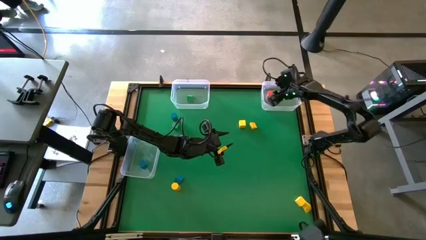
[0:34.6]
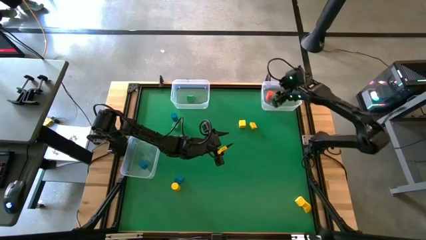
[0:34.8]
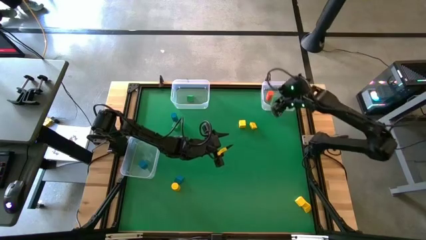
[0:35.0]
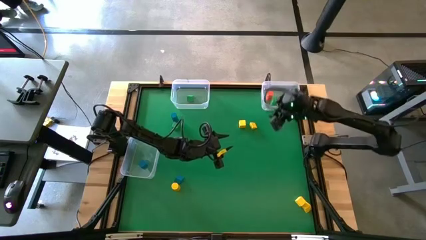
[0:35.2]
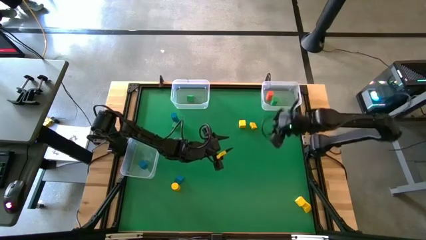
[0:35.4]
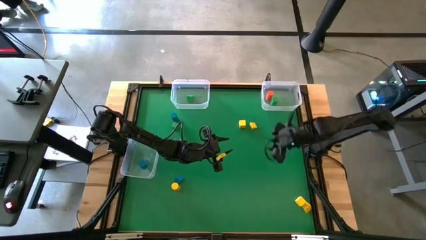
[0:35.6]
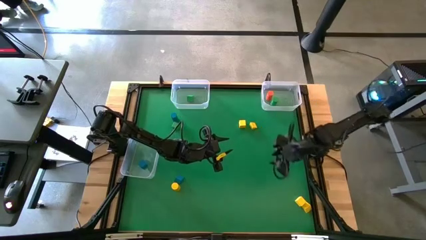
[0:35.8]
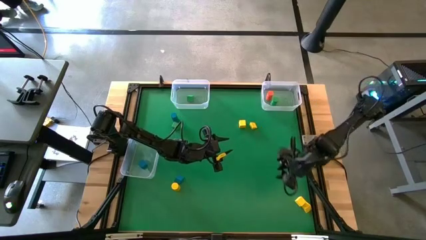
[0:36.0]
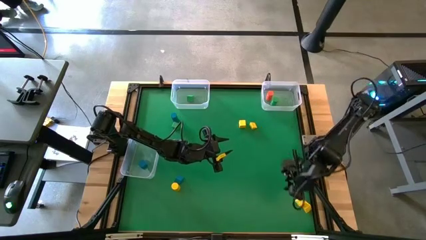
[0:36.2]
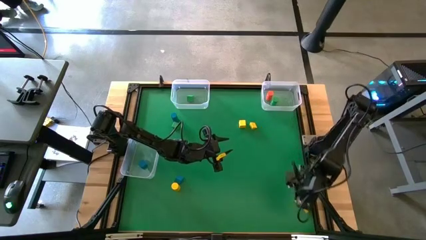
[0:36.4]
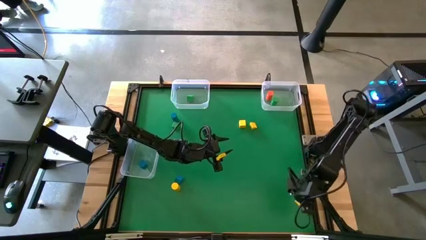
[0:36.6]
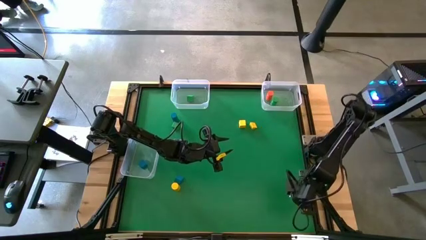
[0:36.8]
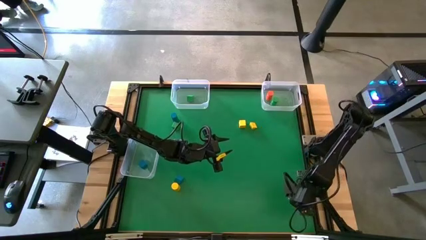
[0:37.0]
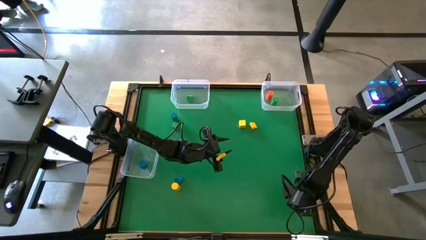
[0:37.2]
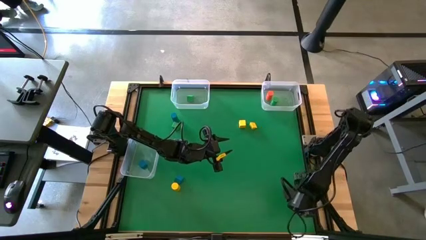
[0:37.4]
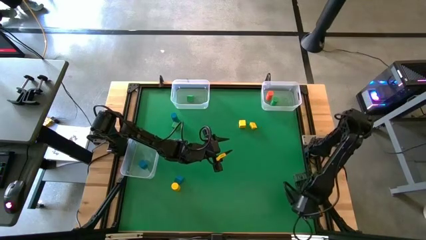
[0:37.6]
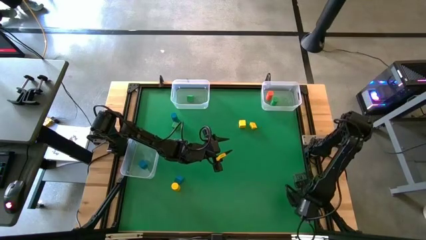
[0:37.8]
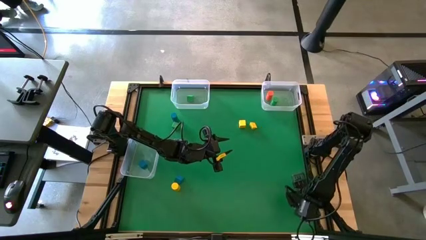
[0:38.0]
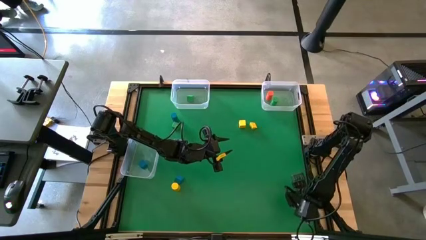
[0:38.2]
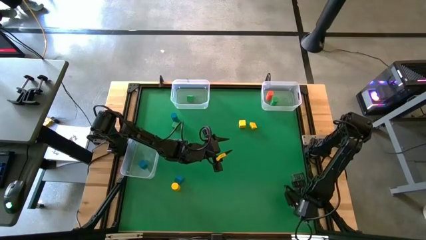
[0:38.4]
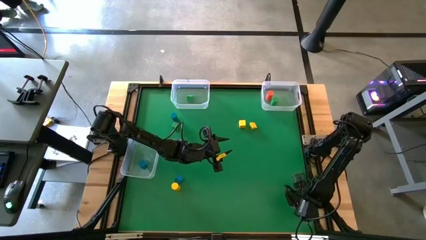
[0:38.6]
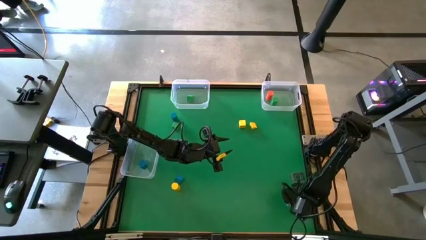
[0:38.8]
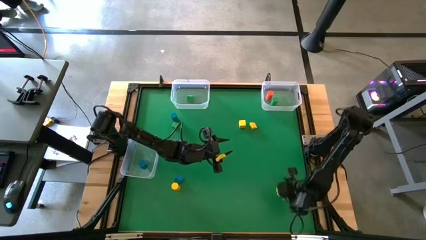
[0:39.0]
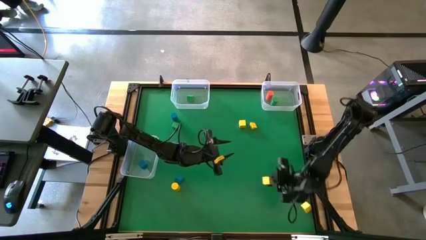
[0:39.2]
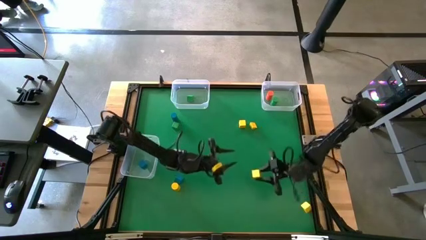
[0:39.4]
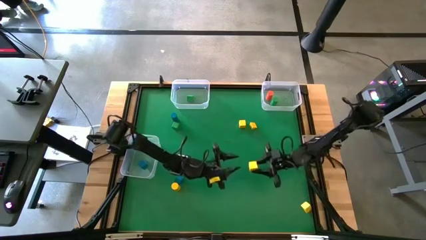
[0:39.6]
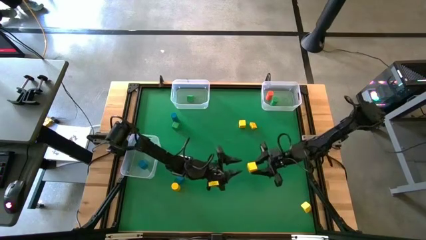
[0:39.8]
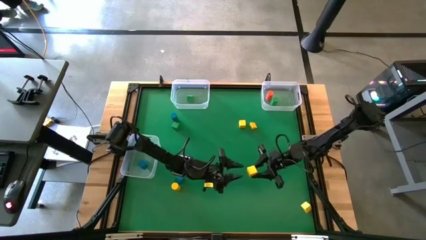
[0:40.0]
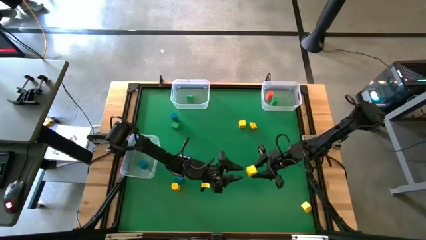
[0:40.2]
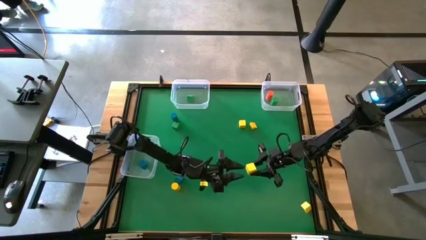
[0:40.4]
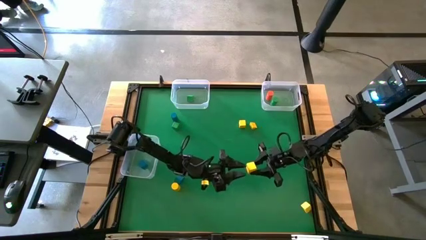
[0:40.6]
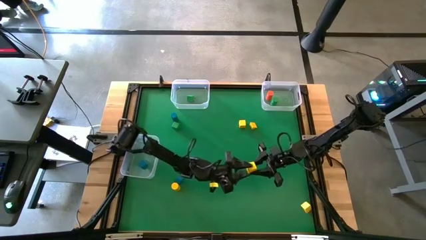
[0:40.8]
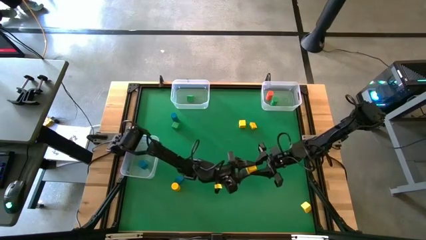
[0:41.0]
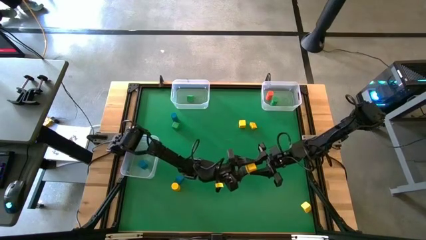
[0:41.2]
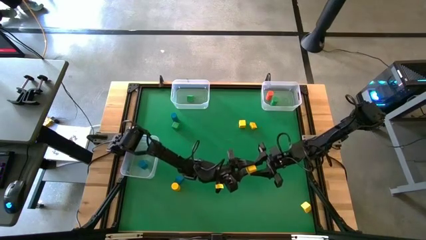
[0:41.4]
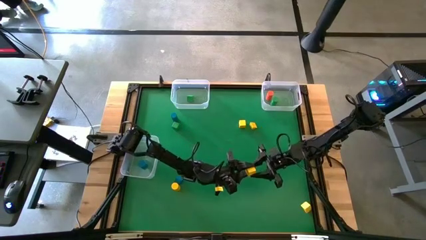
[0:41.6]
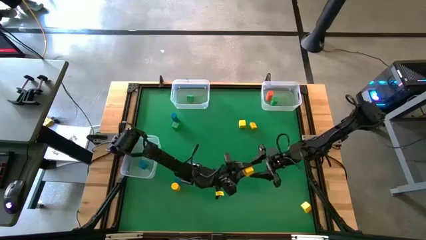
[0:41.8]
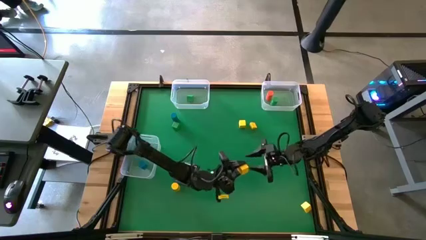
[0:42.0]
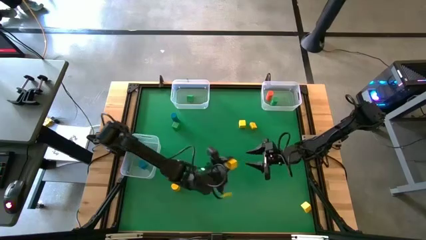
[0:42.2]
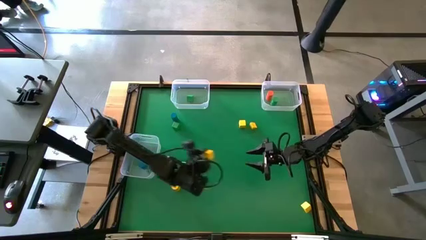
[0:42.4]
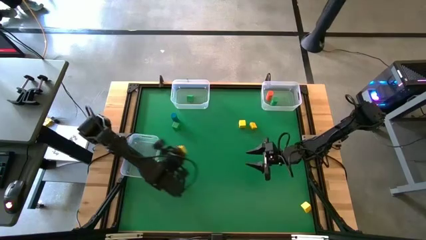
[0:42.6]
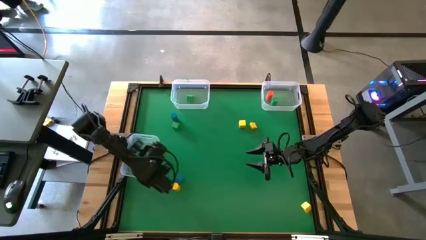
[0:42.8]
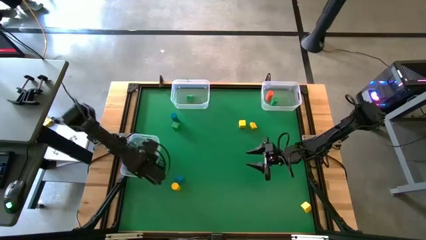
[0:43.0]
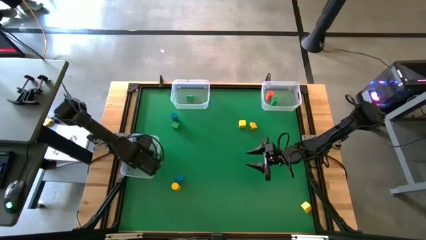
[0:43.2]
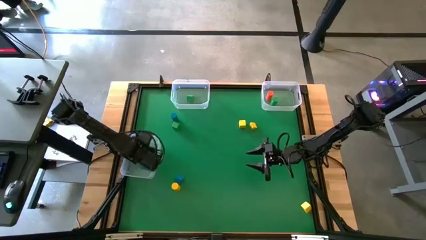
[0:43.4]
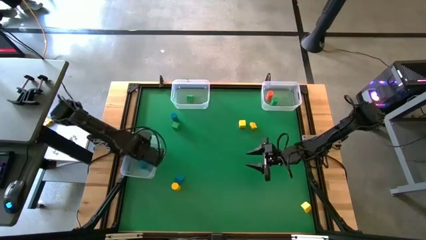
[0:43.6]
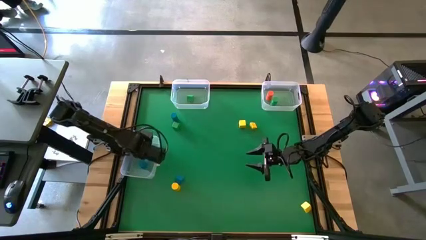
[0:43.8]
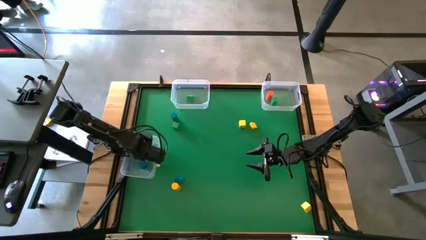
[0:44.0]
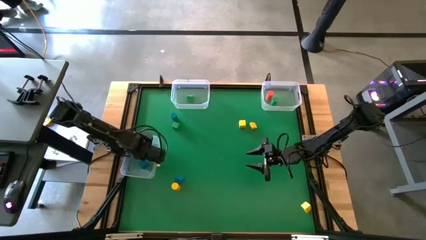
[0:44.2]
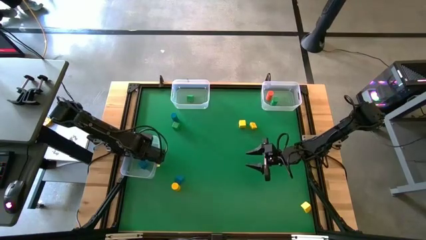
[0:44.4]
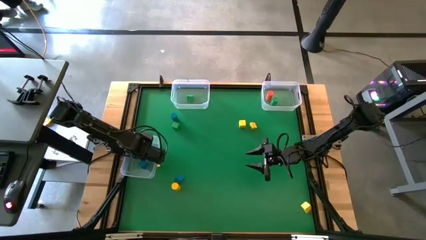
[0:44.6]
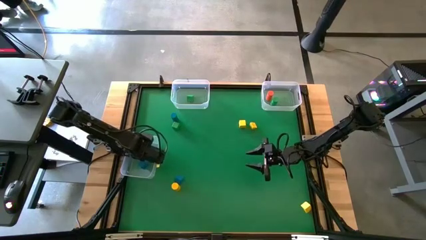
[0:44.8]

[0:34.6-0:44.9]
Task: Sort blocks by size
Put the yellow square block into the bottom transparent bin

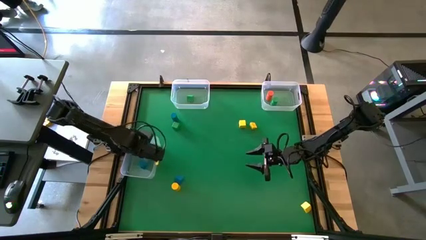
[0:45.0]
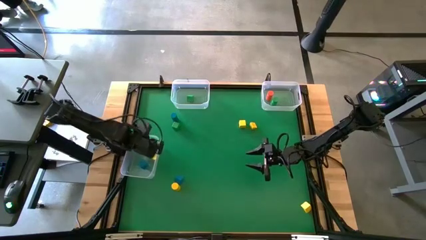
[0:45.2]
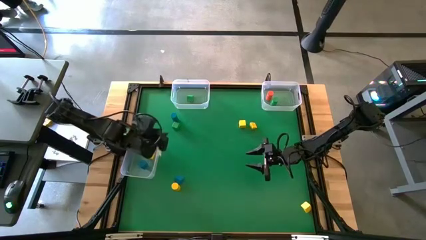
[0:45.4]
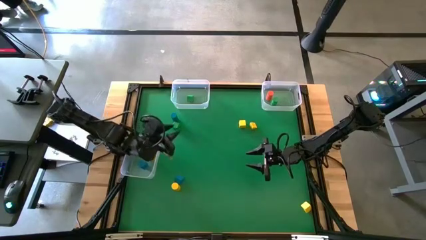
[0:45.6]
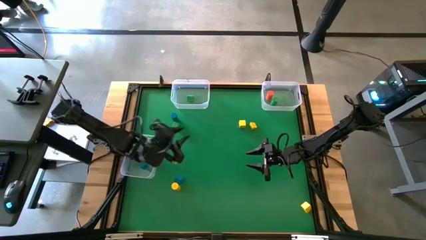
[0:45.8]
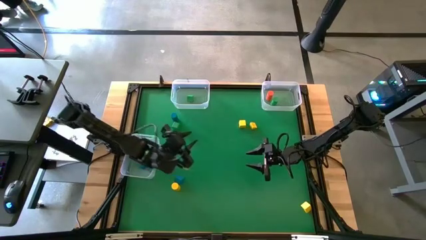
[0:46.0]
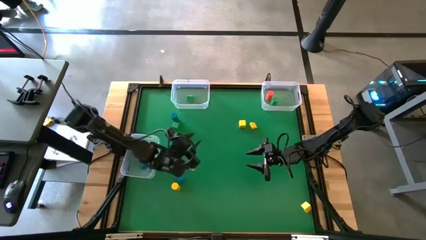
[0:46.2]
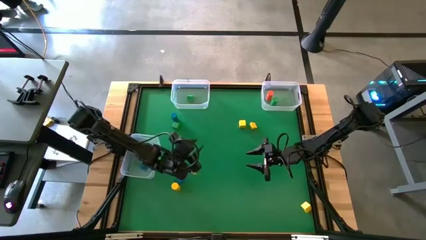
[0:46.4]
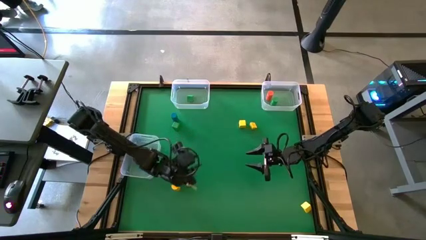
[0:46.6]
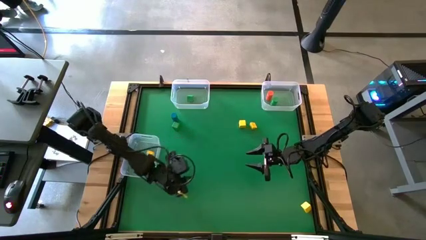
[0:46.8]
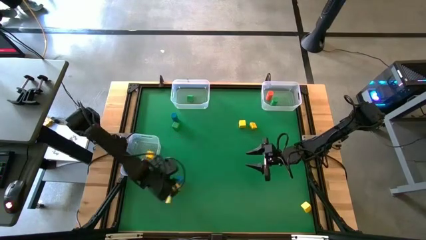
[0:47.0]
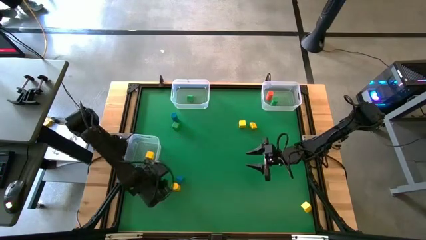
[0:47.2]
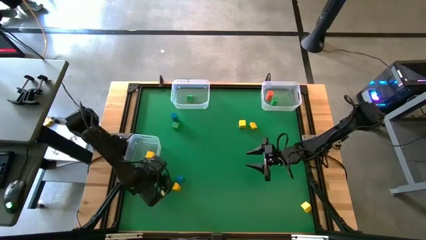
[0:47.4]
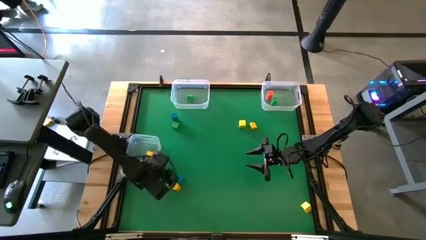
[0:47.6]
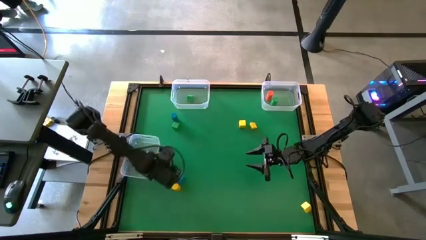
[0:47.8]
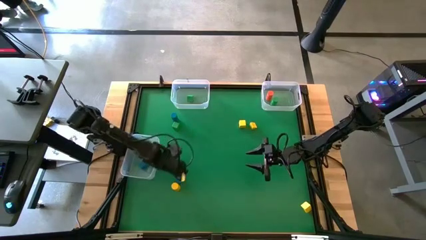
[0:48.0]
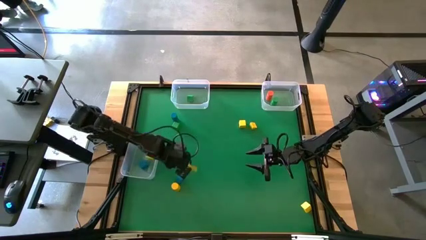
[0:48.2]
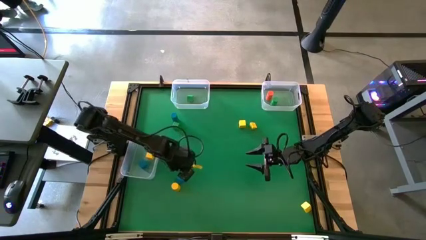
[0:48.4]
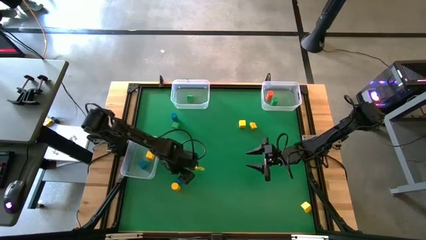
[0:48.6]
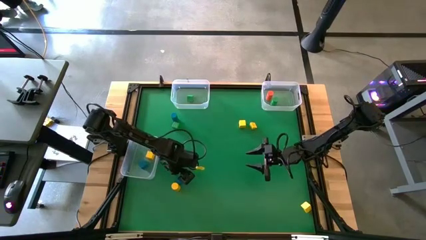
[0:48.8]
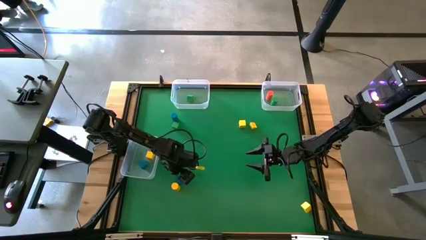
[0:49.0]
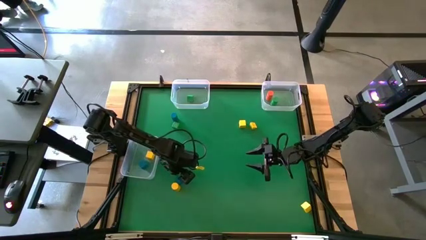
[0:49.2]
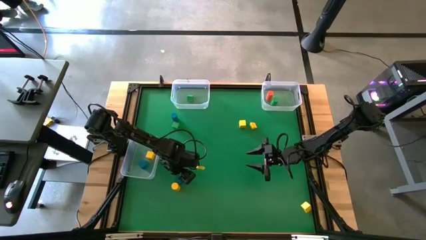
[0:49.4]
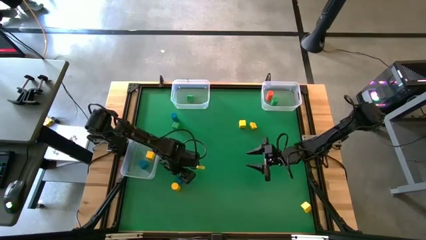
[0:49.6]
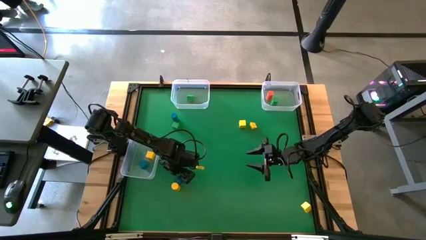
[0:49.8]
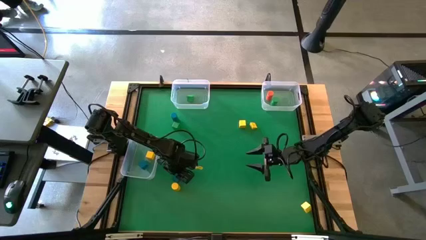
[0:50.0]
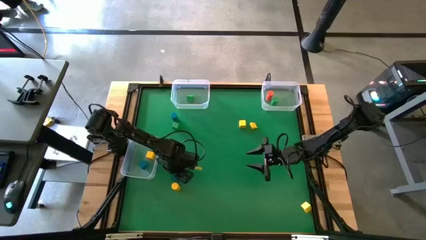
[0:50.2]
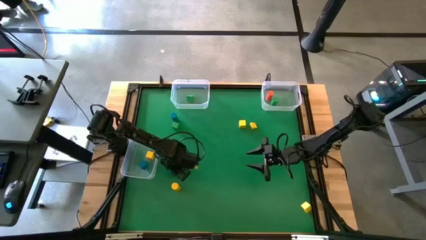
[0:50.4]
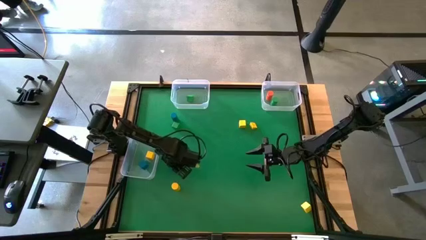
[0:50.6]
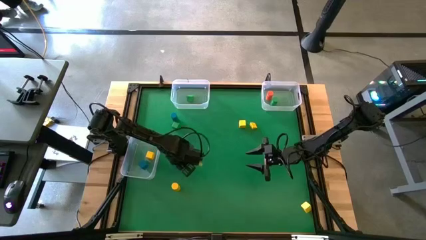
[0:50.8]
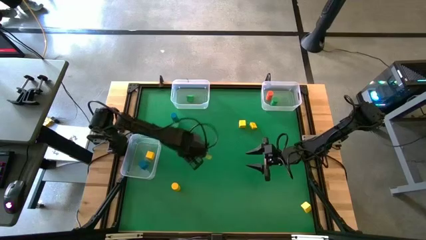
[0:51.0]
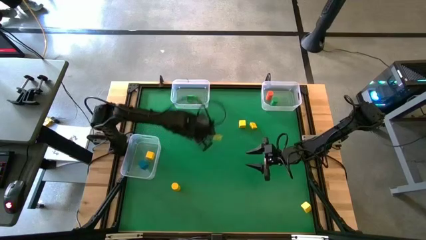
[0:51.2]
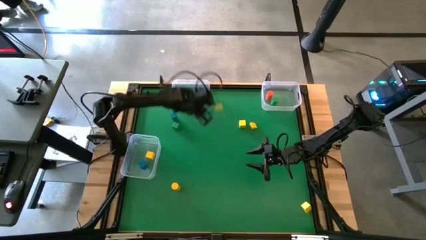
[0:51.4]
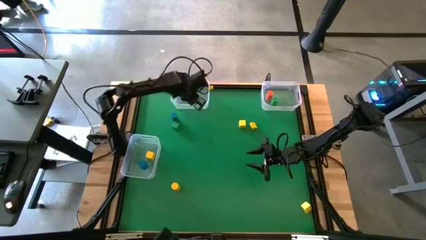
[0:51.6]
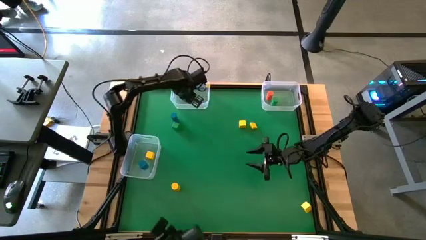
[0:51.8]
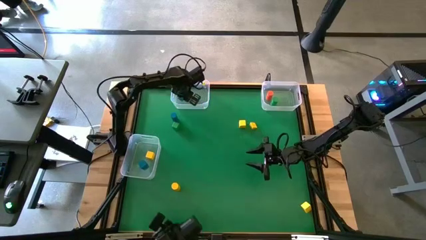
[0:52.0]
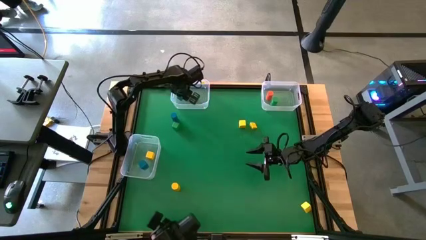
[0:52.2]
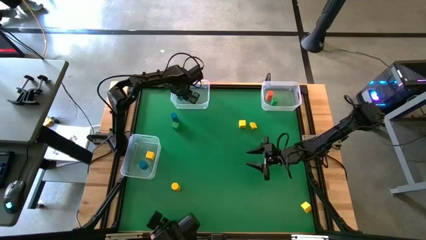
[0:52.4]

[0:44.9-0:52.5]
Put the blue triangle block into the top left transparent bin
